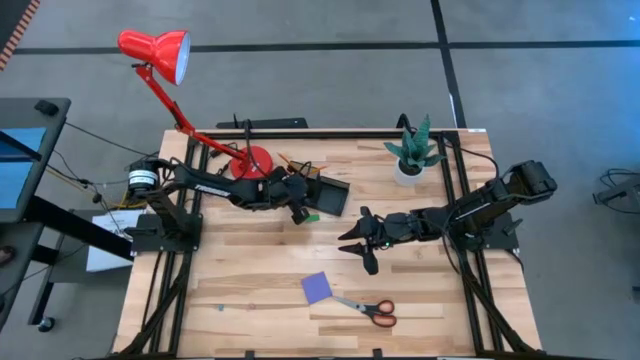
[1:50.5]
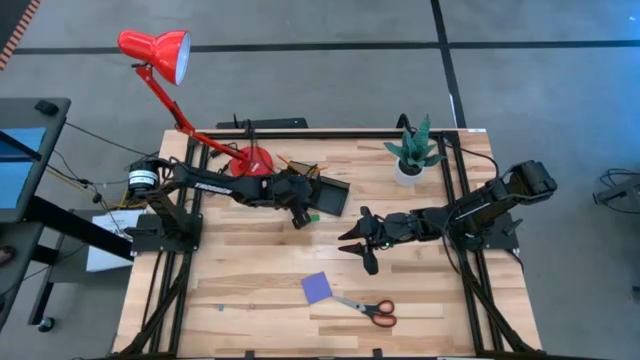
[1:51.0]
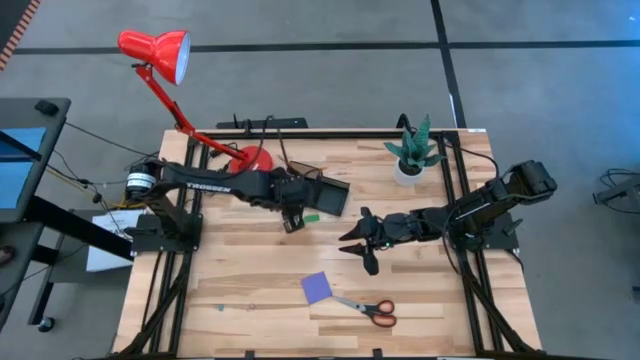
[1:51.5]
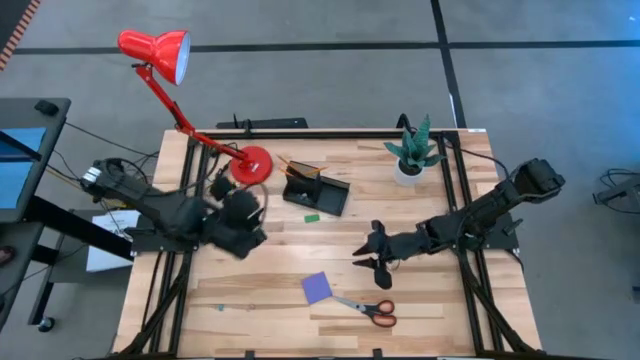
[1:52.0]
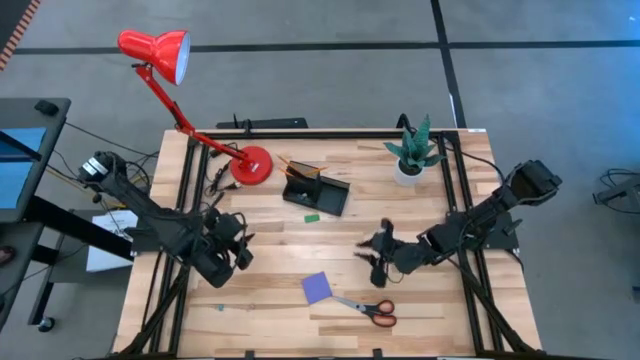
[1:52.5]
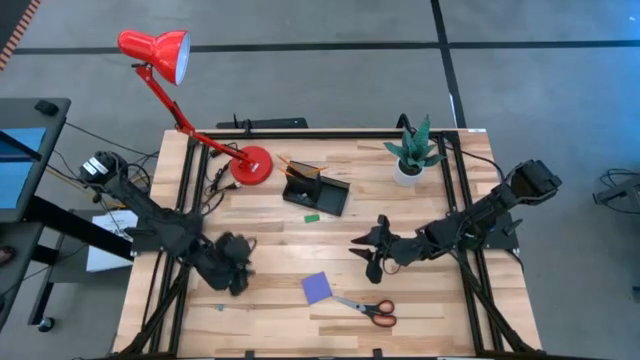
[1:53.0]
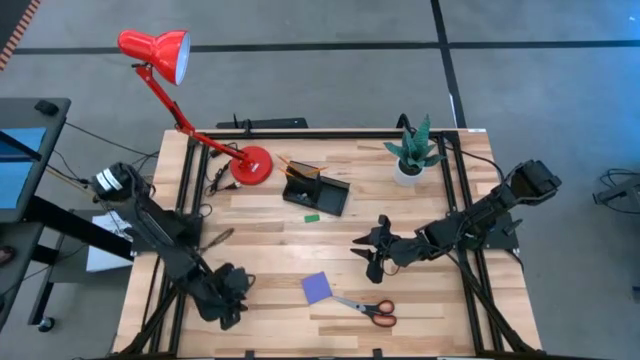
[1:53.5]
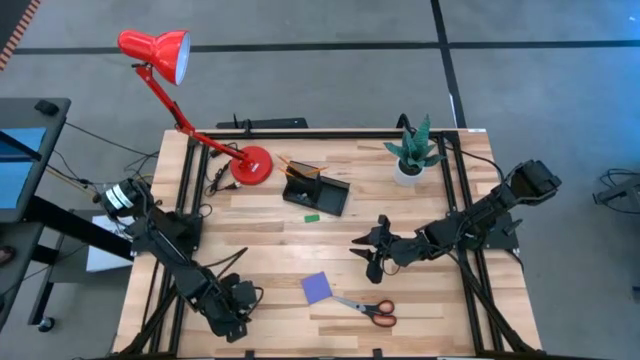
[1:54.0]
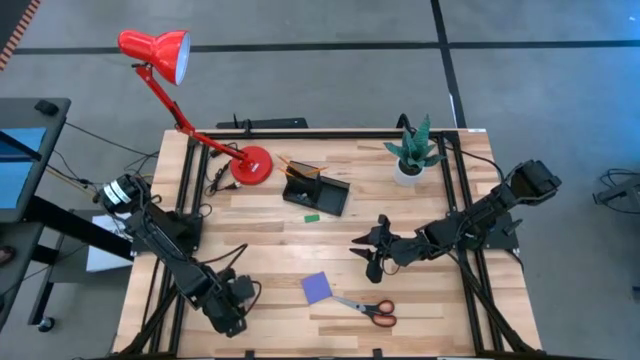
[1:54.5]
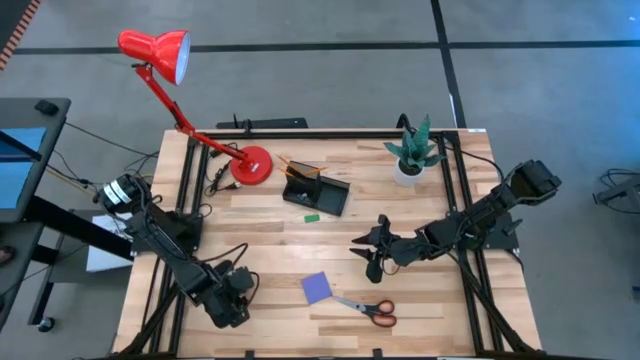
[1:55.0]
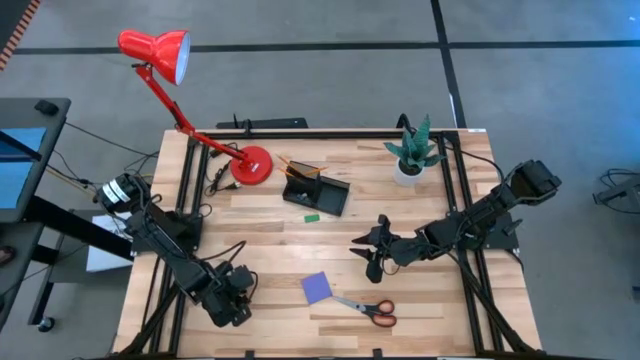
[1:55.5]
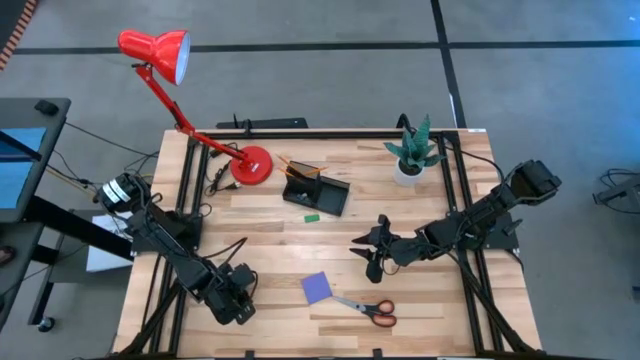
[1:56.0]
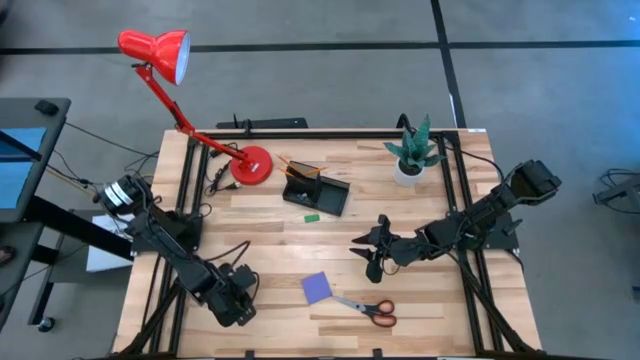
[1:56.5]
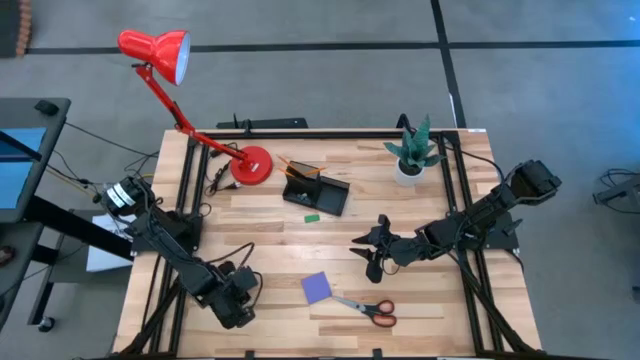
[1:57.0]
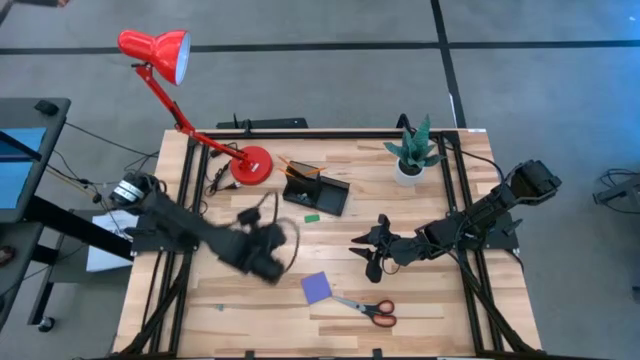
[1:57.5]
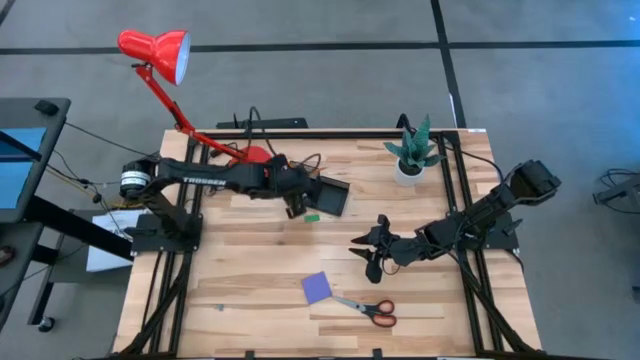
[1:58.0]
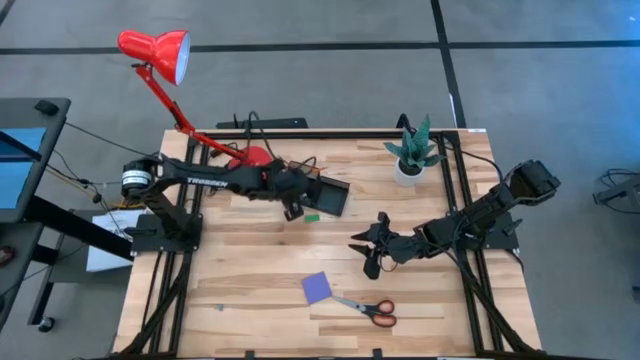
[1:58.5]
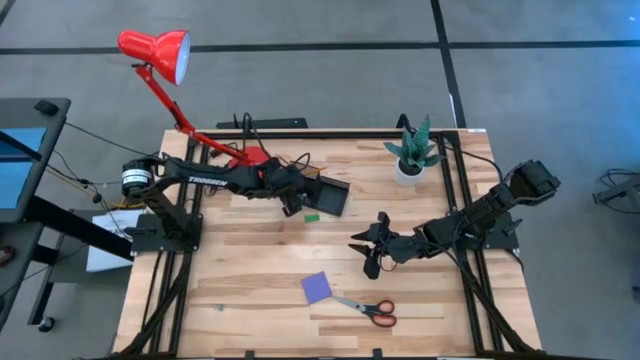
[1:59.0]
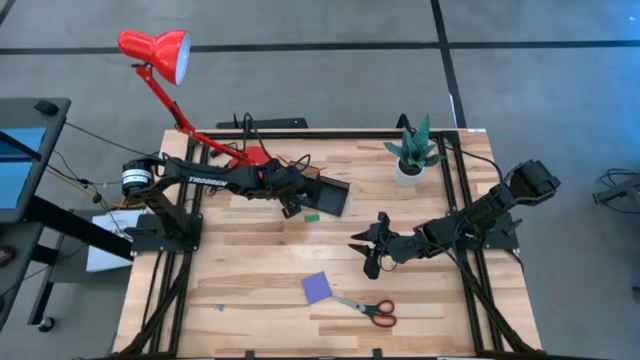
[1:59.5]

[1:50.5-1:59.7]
Task: Pick and place office supplies into organizer
Put the pink binder clip into the black desk organizer

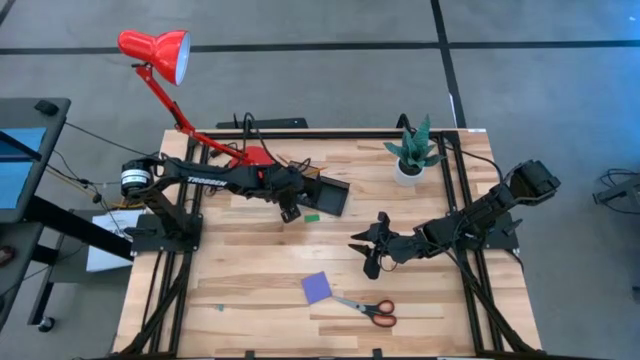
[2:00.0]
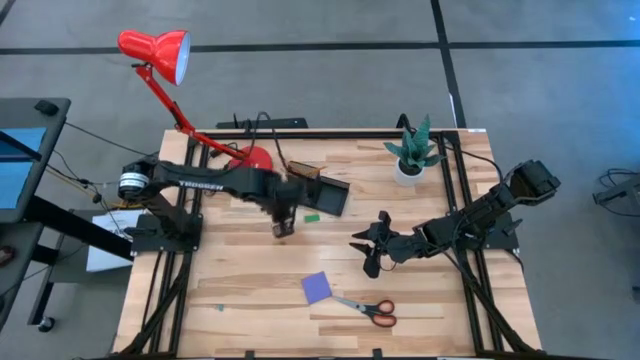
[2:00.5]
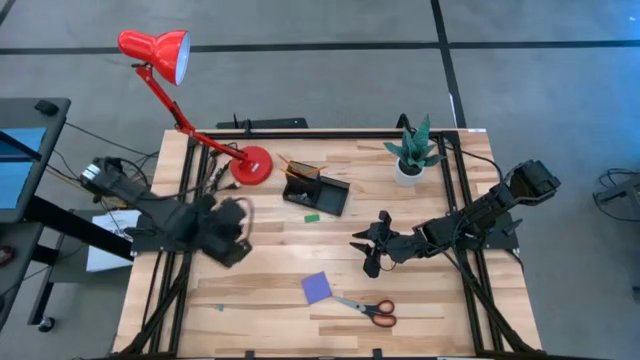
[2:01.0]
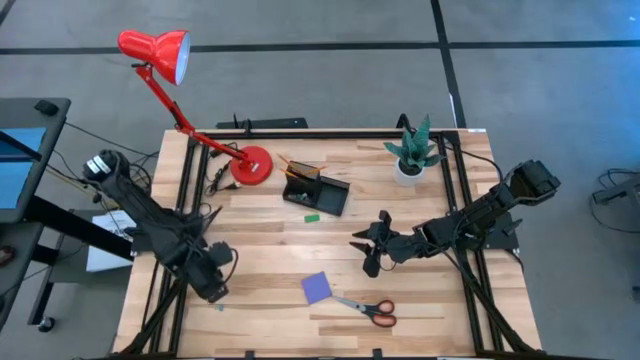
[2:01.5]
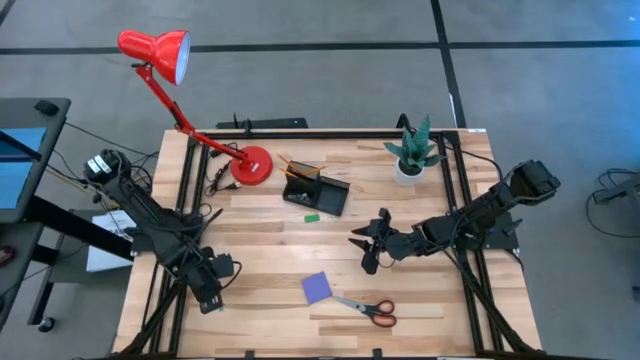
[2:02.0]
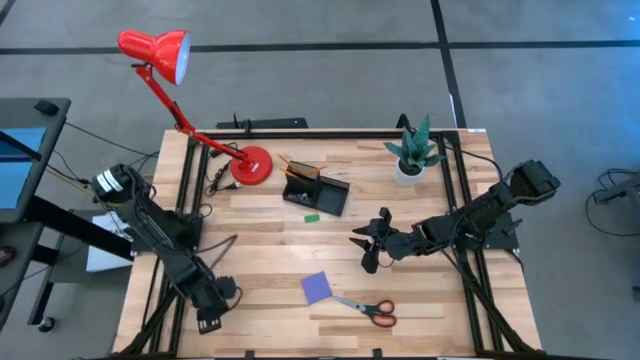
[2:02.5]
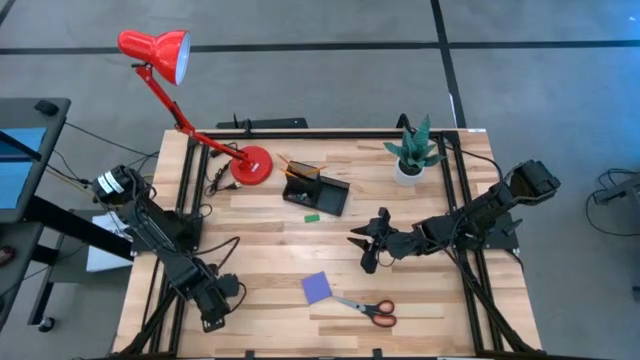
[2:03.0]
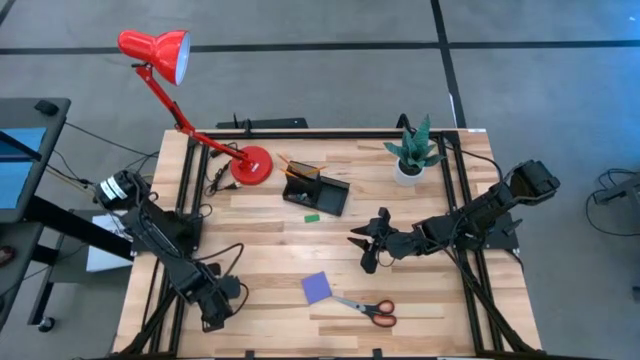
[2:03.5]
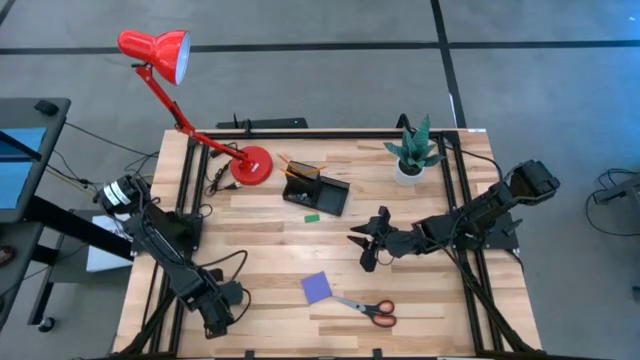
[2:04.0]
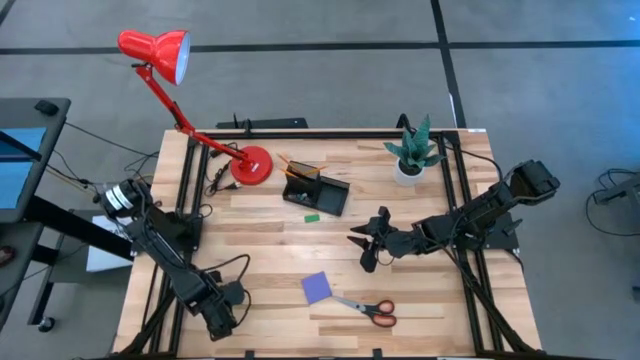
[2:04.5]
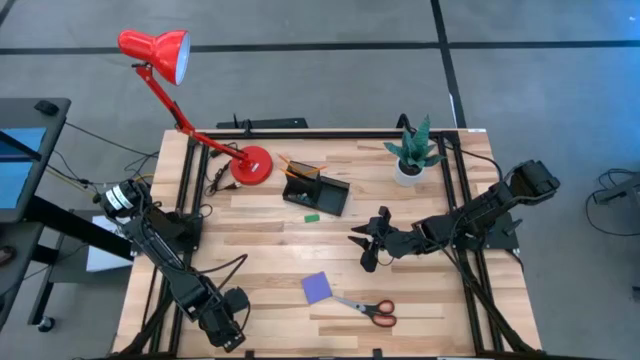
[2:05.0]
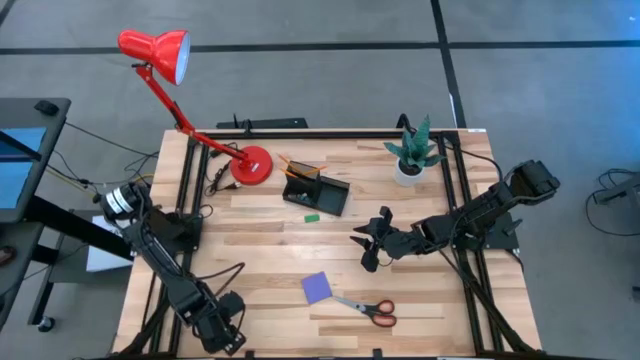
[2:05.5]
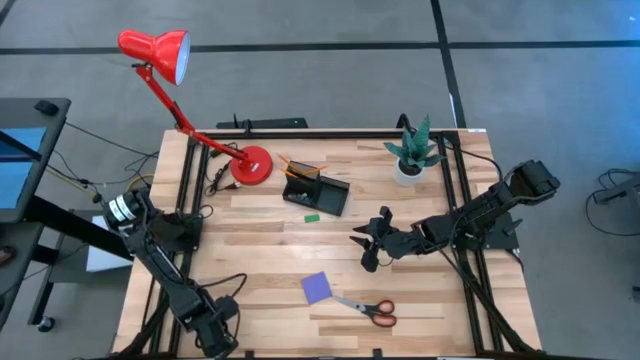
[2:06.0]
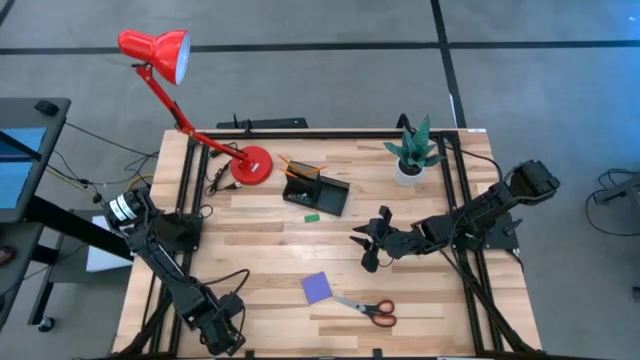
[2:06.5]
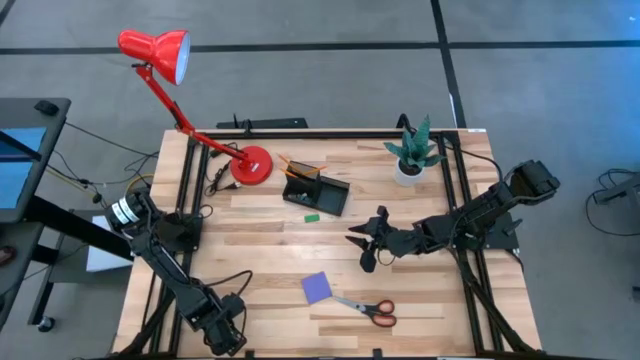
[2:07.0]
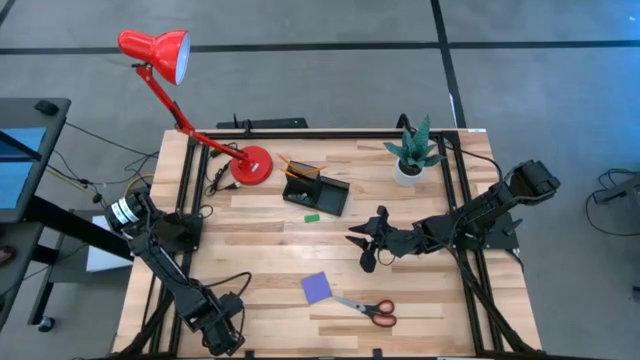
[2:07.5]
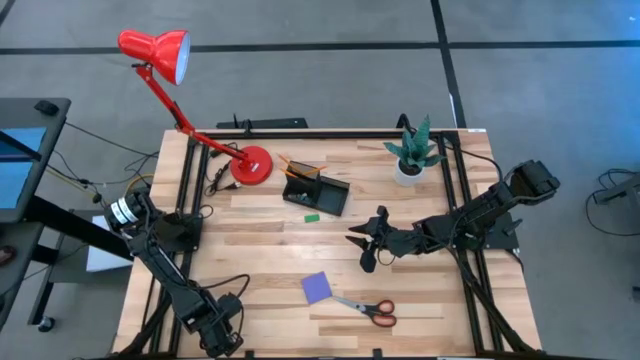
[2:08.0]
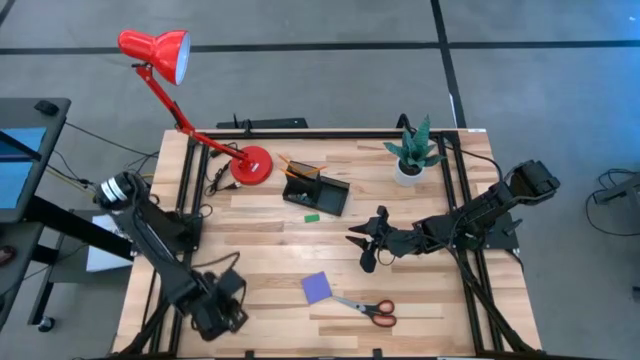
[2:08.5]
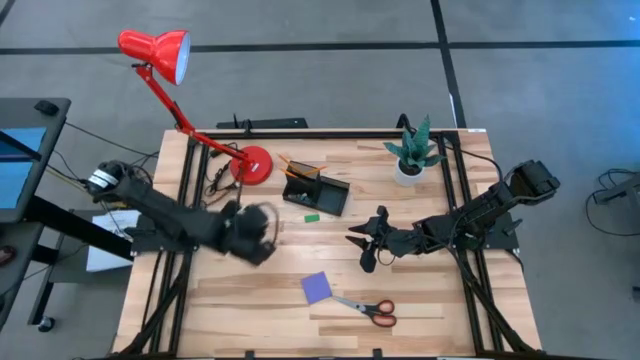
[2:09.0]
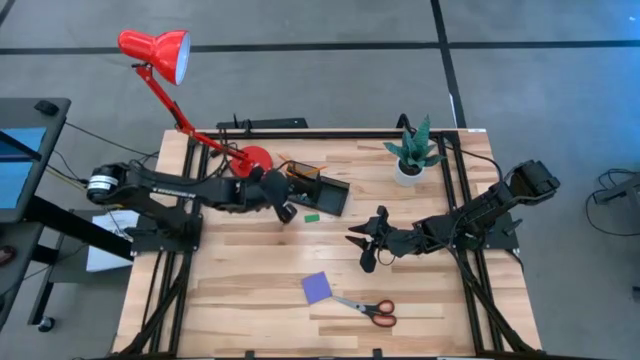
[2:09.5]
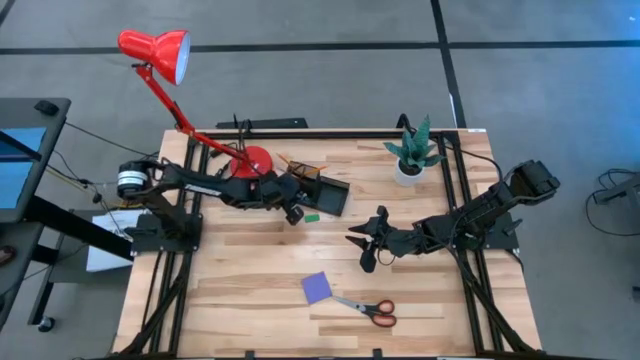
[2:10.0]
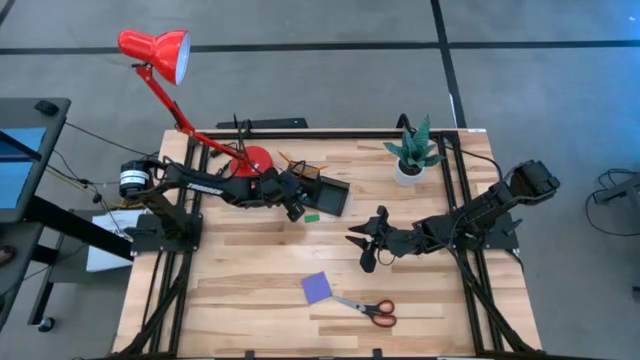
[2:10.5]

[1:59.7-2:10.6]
Put the bottom blue binder clip into the black desk organizer
